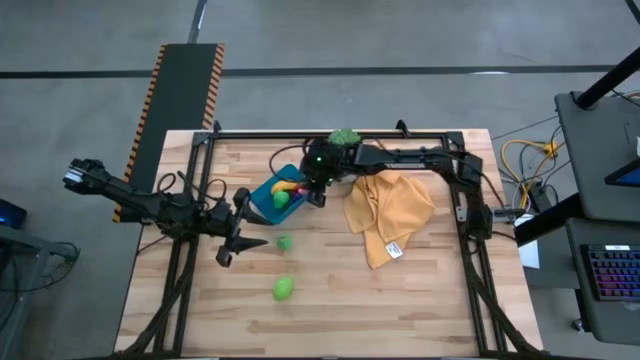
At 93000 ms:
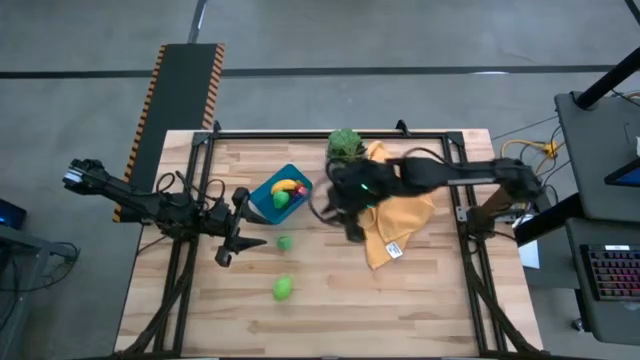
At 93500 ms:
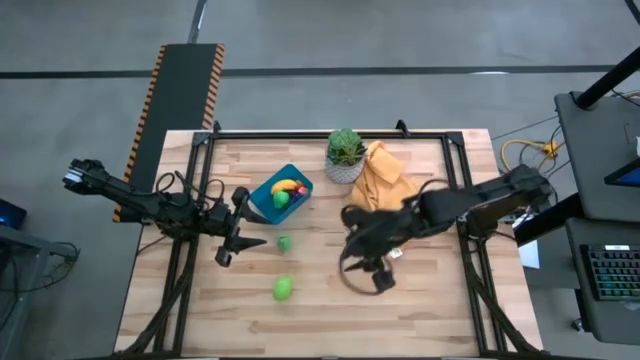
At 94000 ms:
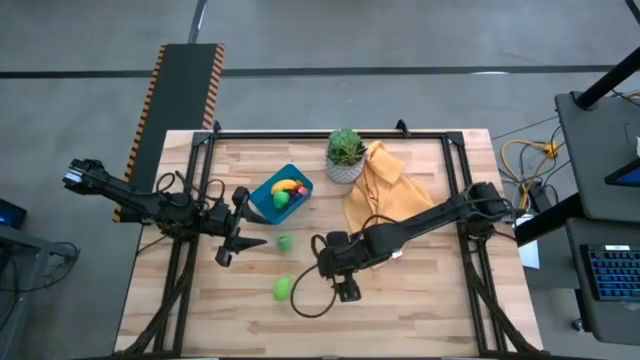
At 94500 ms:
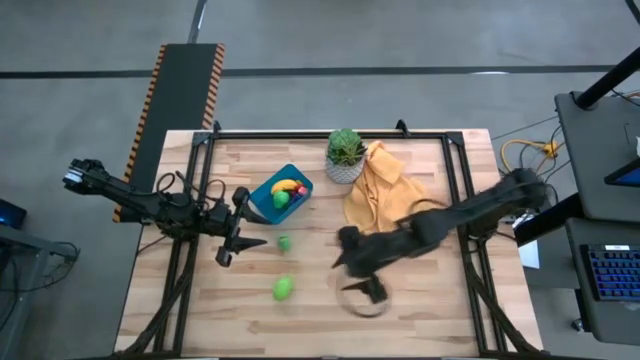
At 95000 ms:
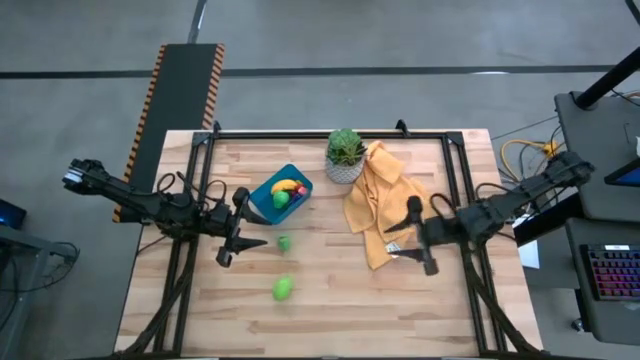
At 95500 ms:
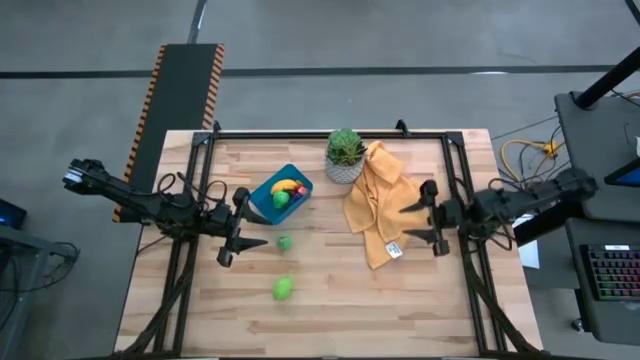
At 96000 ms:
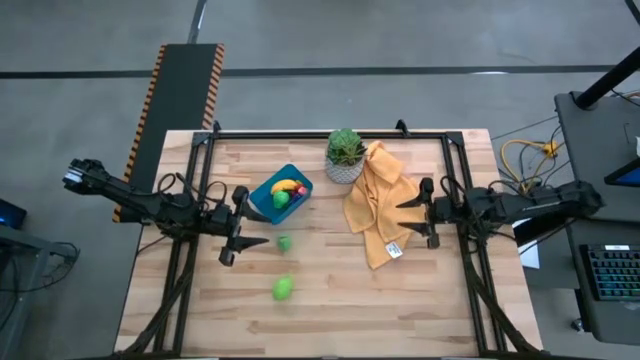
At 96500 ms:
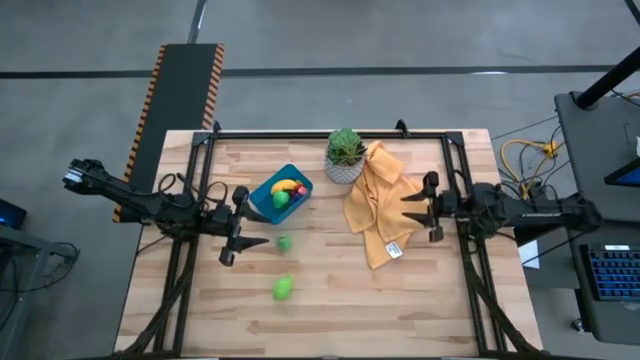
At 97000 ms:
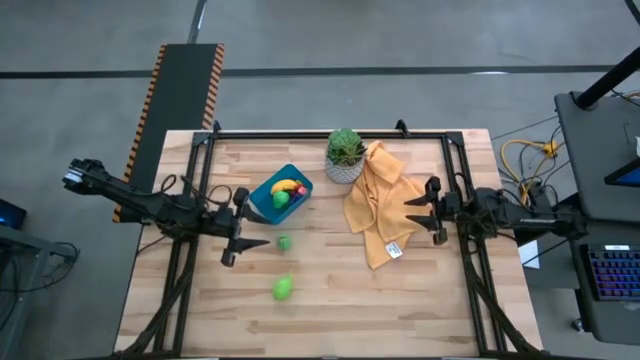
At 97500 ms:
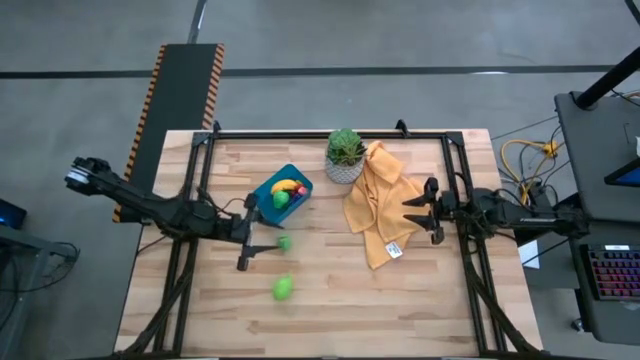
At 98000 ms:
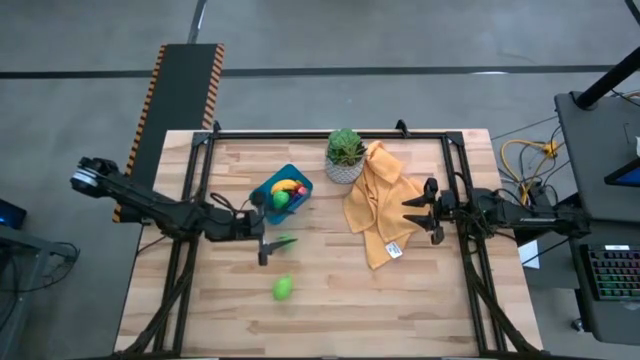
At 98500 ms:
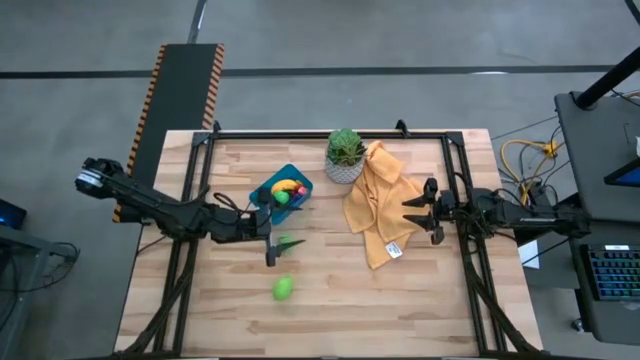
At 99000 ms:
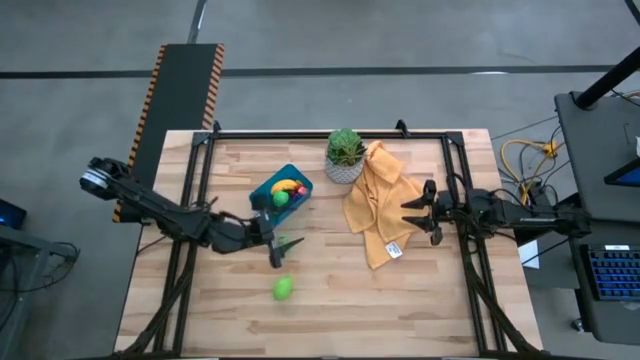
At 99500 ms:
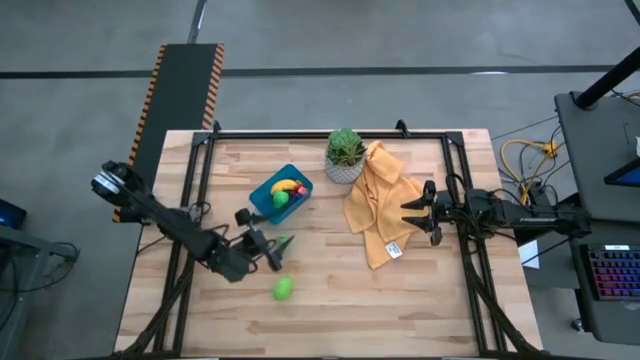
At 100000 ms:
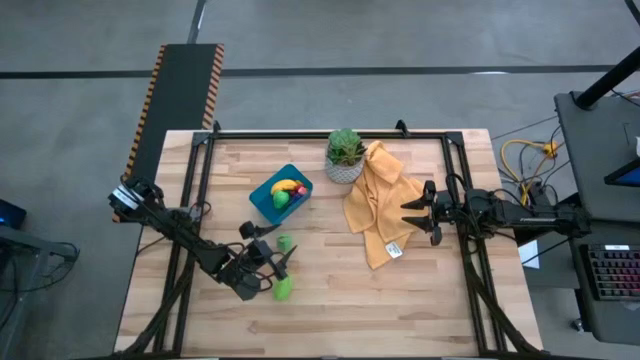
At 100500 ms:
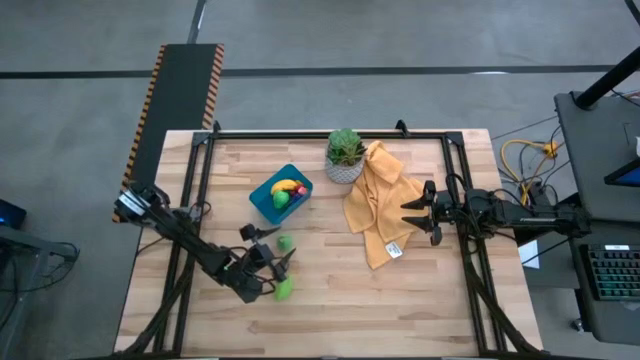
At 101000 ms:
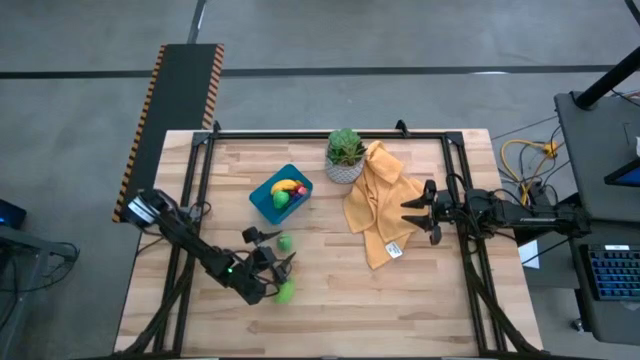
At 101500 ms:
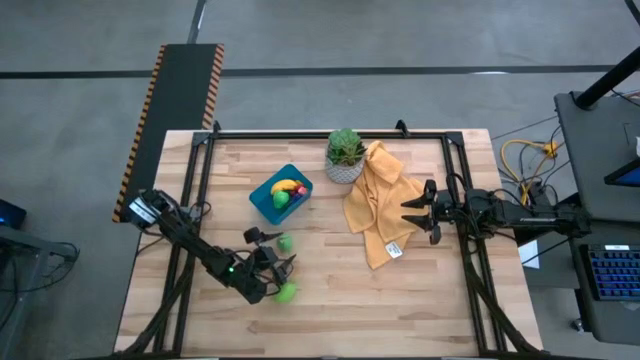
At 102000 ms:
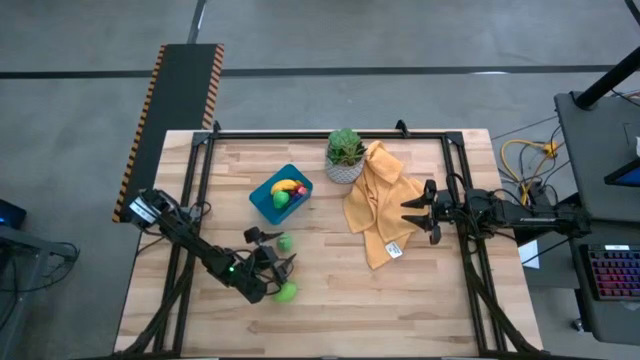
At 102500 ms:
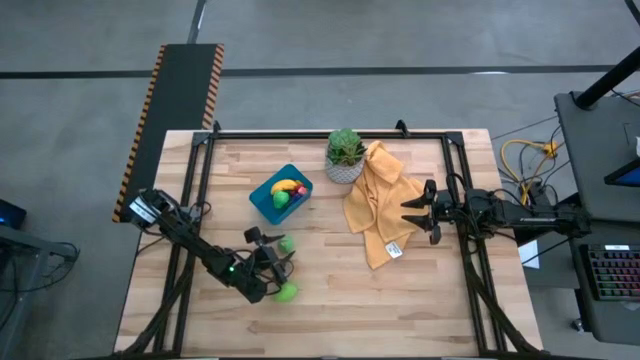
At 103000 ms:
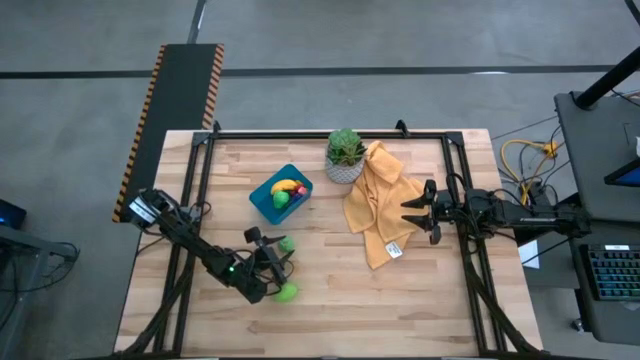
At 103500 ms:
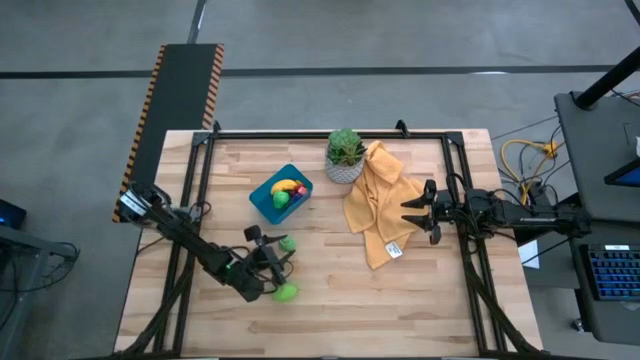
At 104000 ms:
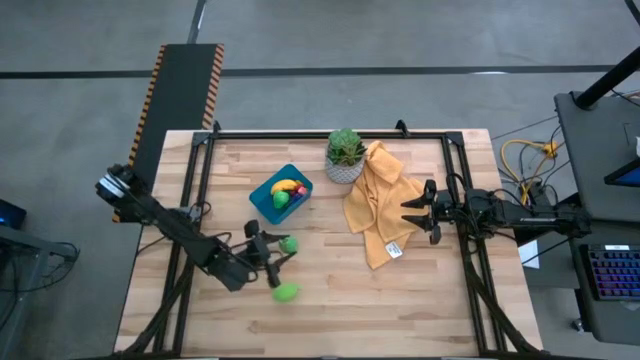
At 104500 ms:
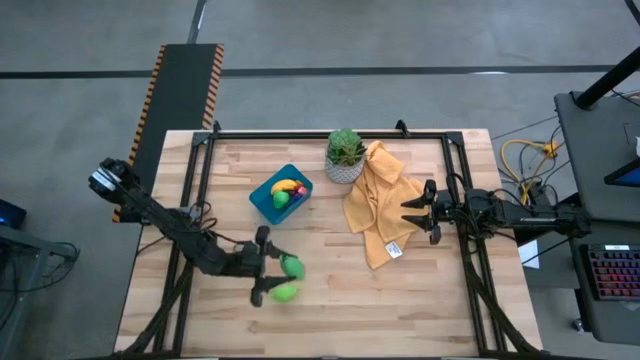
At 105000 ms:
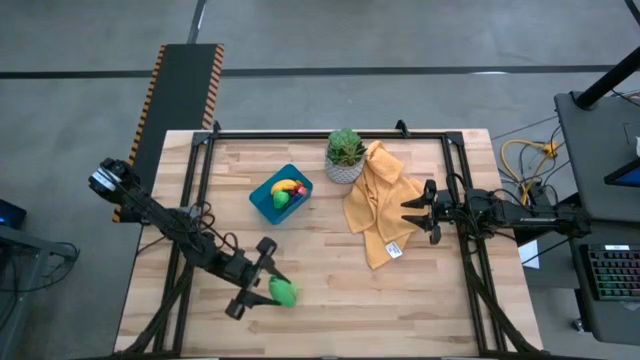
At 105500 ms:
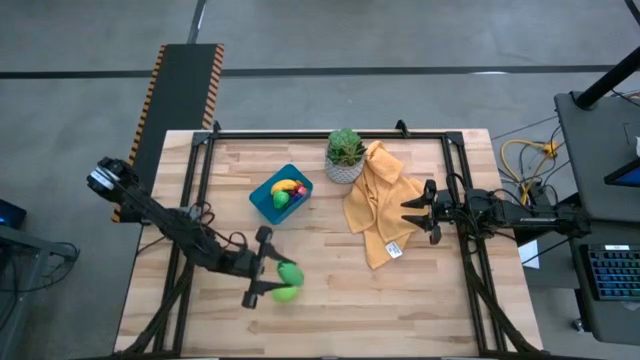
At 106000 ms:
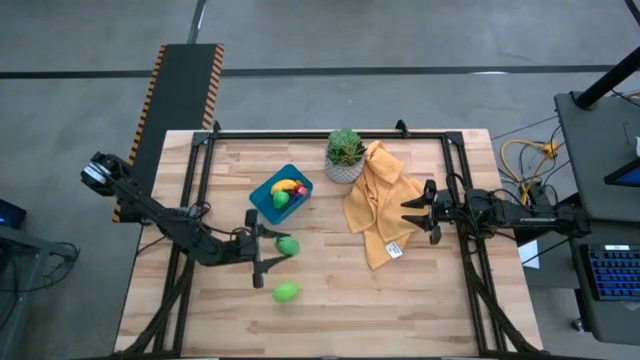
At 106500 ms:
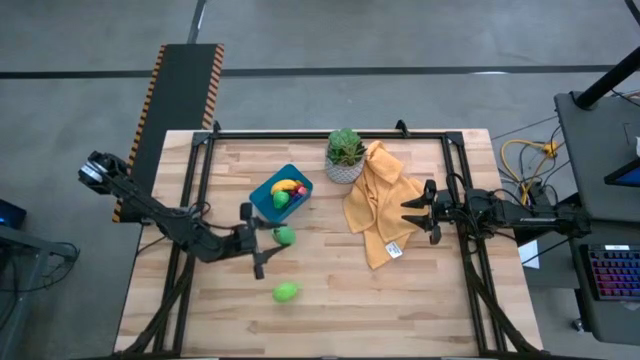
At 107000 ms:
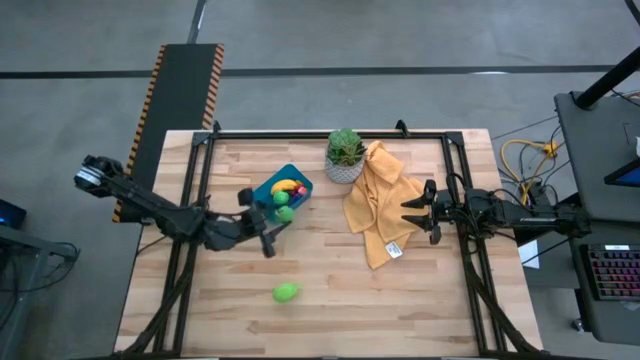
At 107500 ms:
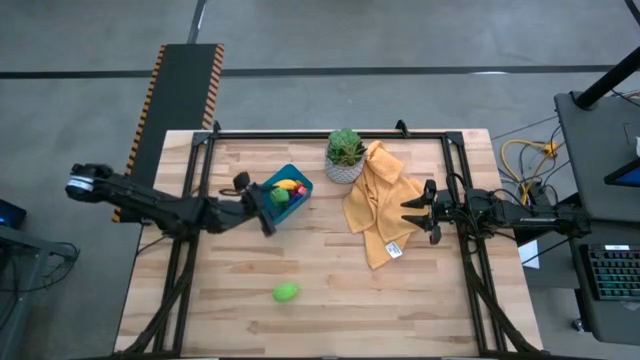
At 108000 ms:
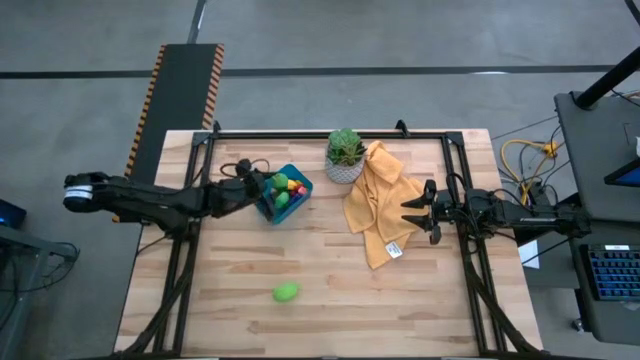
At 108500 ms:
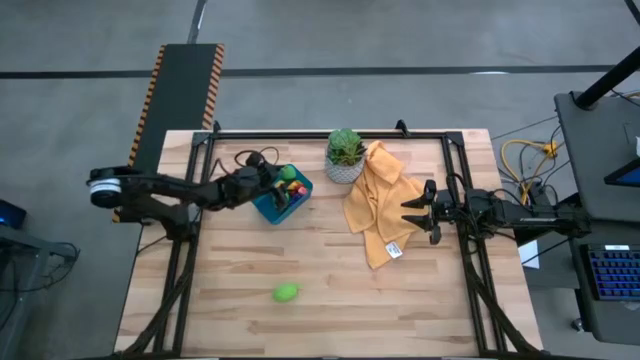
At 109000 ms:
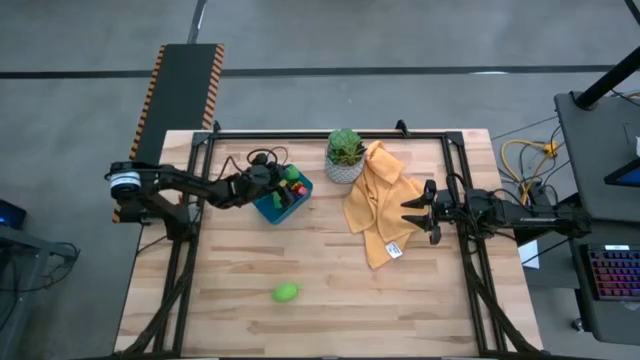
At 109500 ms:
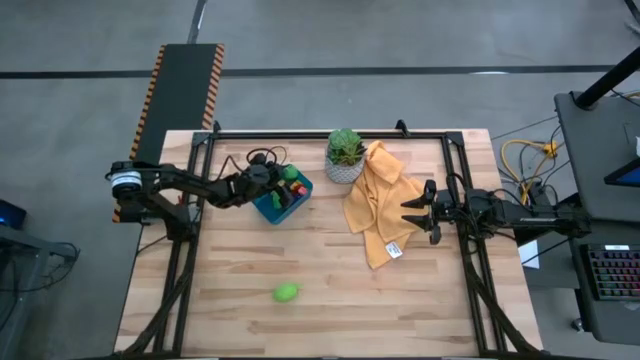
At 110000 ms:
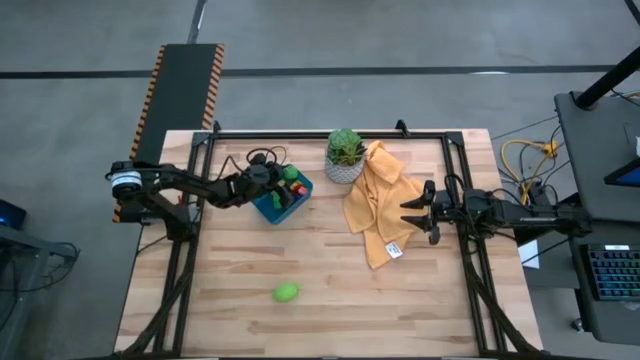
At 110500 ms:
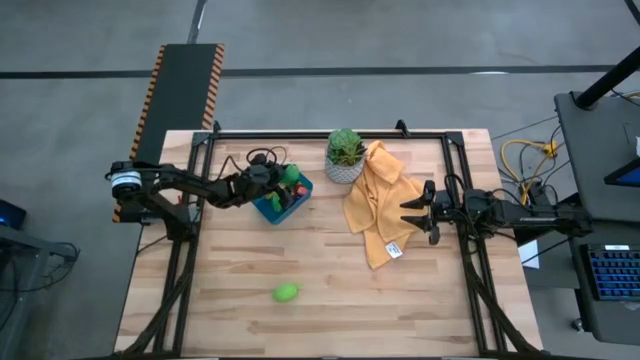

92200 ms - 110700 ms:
Task: Pick and placing Produce into tupperware
Put the green corn into the blue bin
